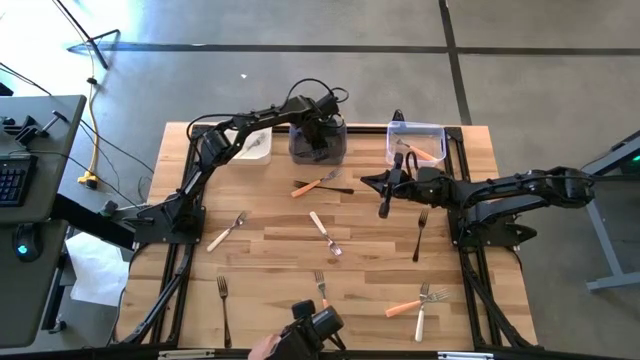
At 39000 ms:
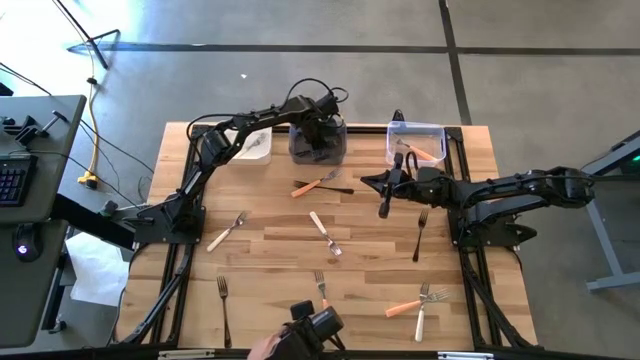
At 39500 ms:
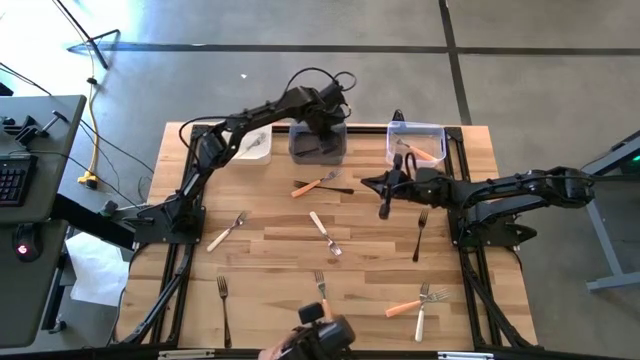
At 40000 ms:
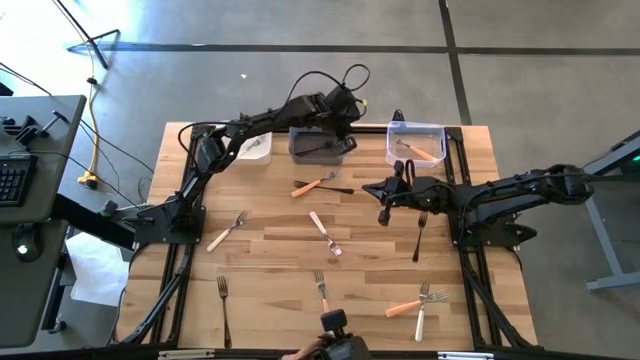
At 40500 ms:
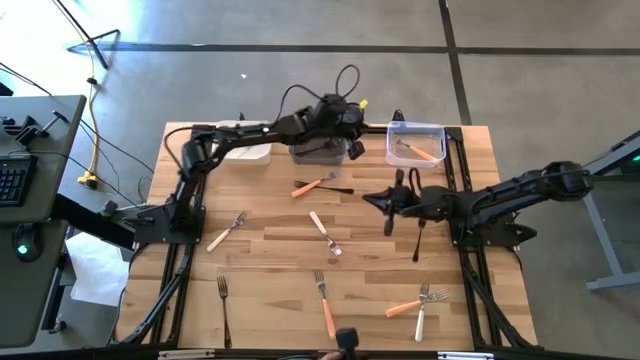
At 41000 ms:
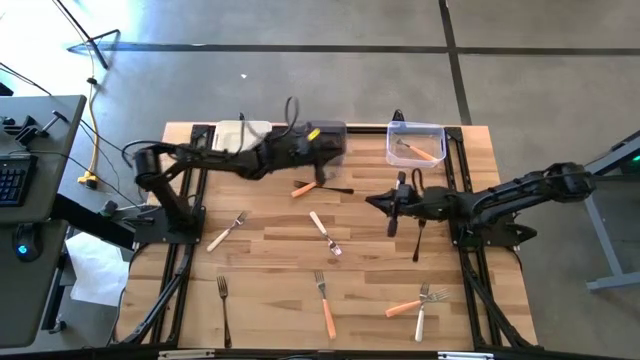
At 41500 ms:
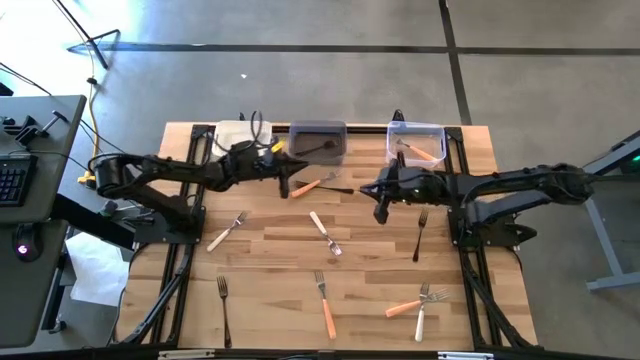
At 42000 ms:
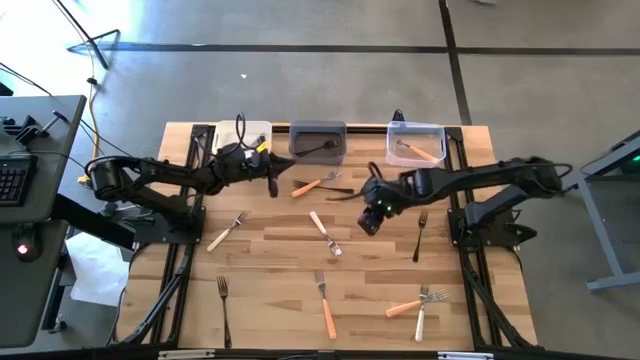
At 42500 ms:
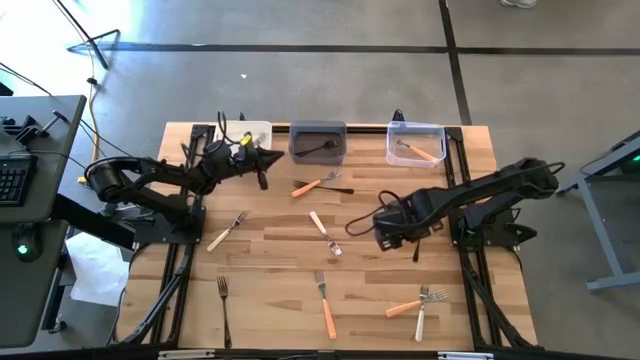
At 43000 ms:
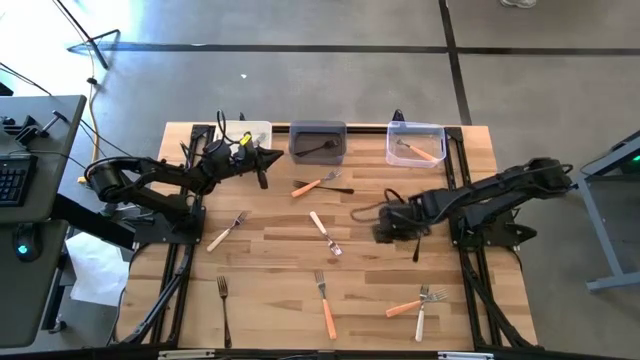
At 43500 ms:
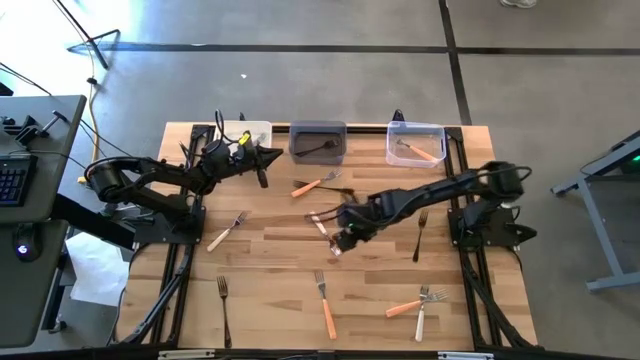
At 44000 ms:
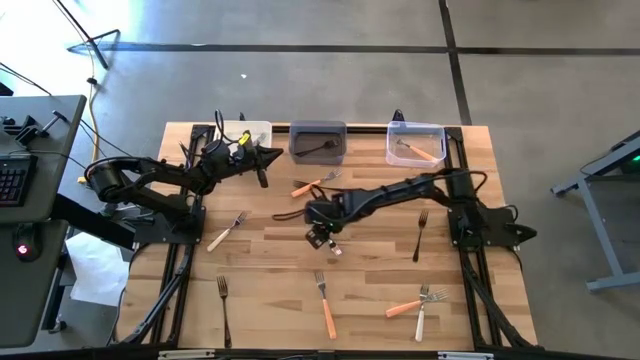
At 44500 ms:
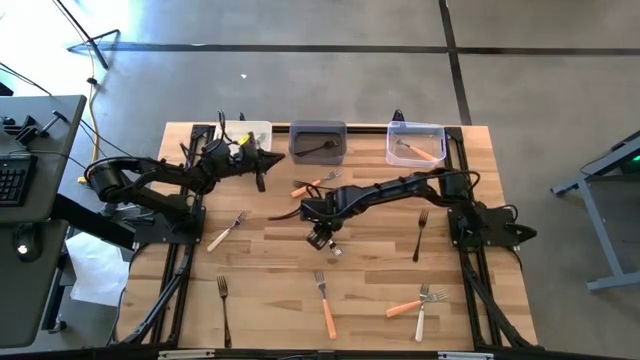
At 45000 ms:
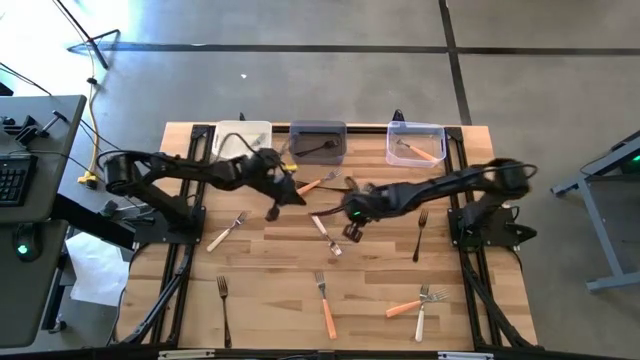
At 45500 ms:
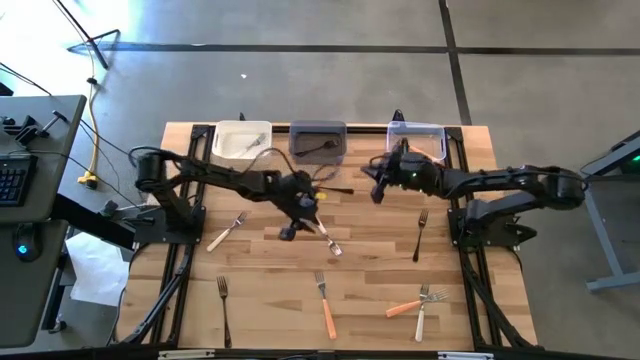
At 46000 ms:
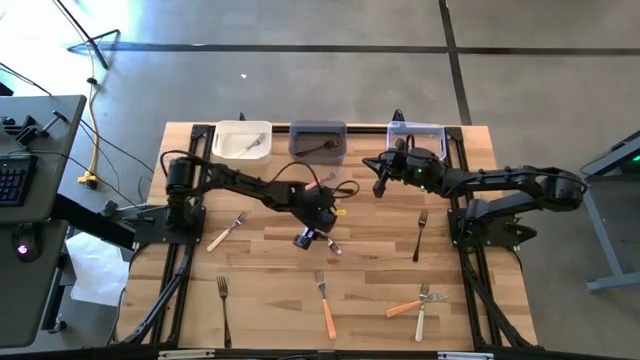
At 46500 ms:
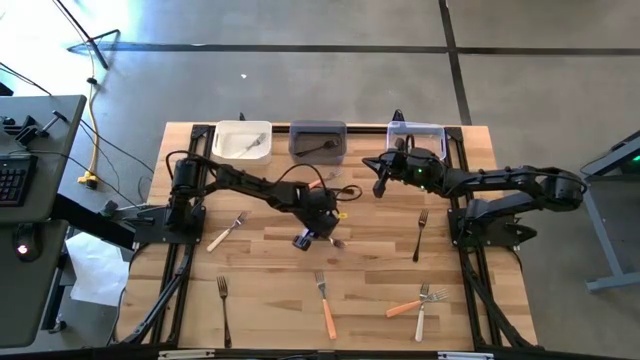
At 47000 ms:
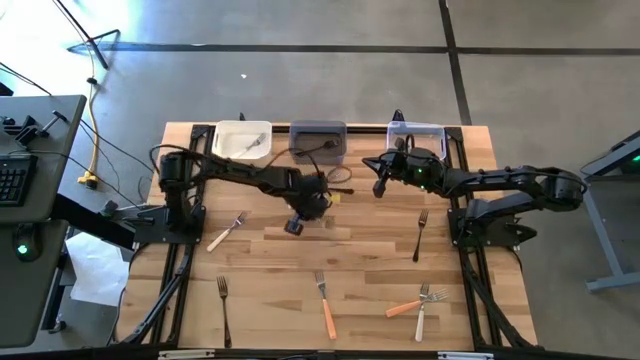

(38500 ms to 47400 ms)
Task: Sort silverware by color (type)
Put the white fork into the white bin

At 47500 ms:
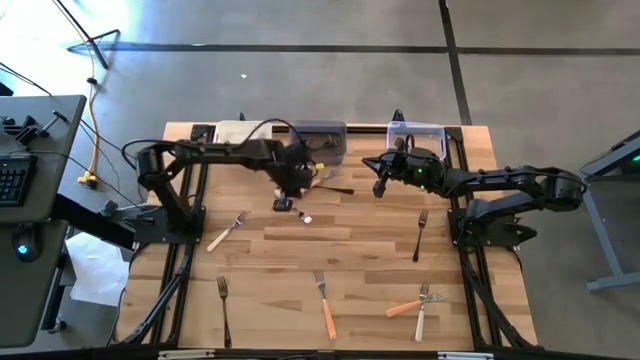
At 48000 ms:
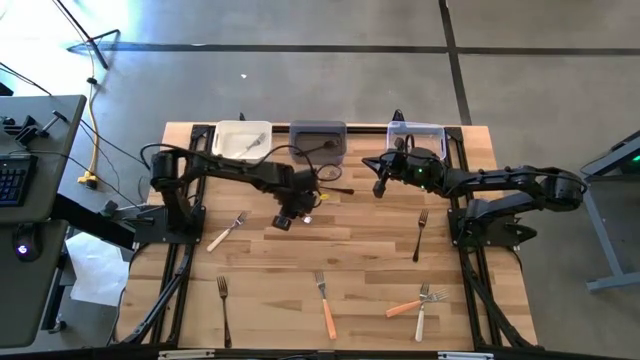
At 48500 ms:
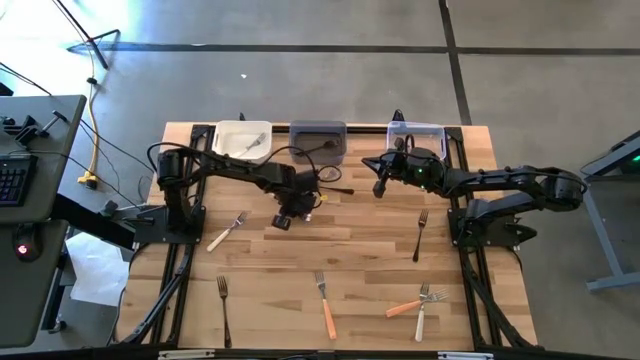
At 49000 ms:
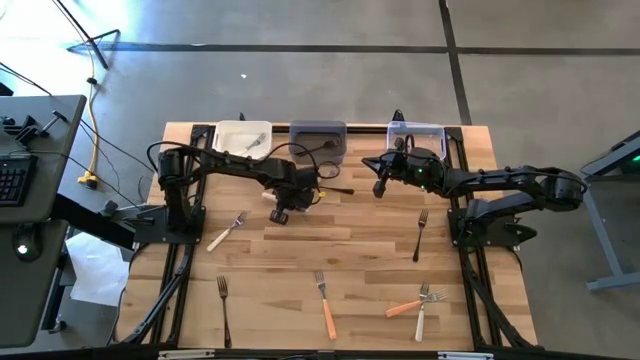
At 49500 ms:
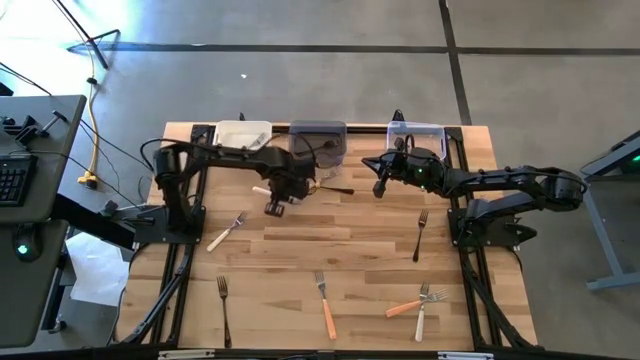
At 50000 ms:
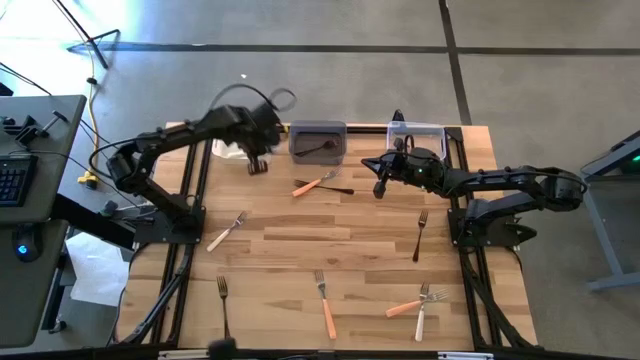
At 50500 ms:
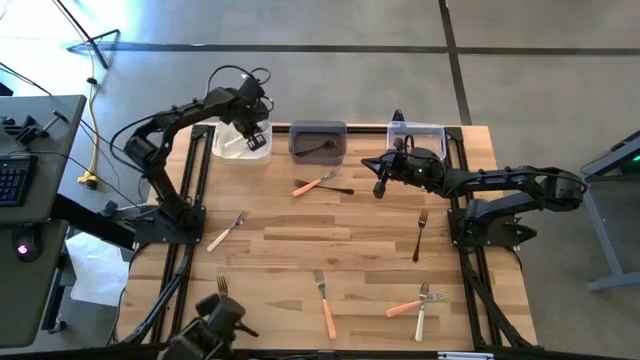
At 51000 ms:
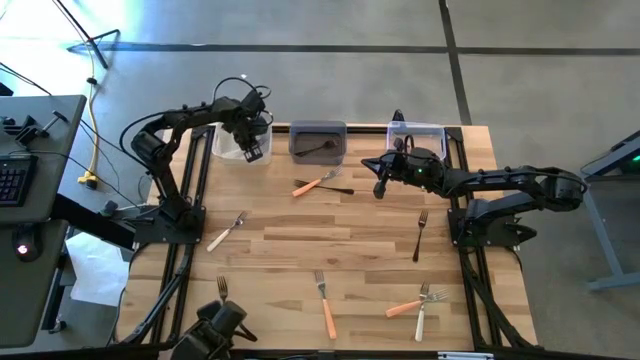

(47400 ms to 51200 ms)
Put the white fork into the white bin

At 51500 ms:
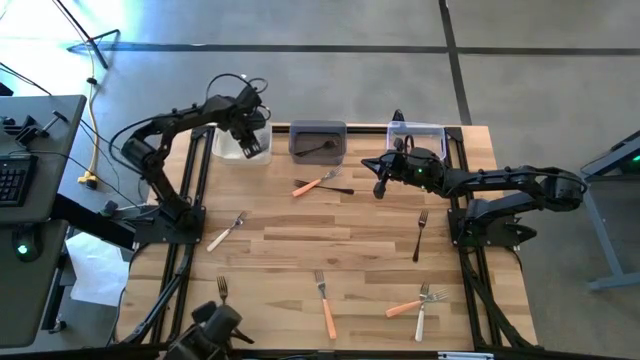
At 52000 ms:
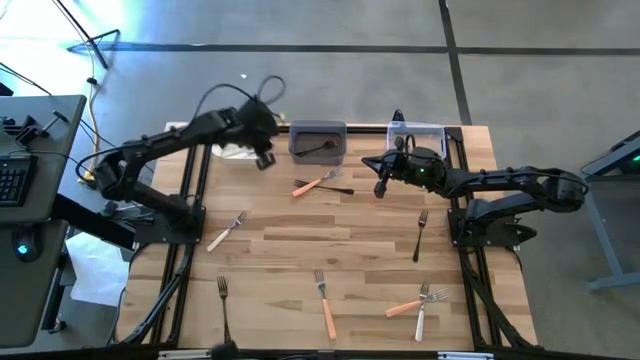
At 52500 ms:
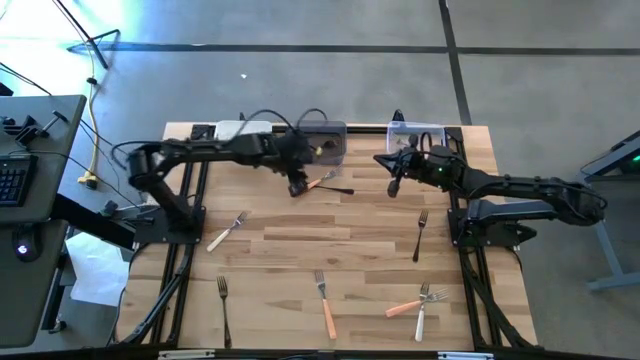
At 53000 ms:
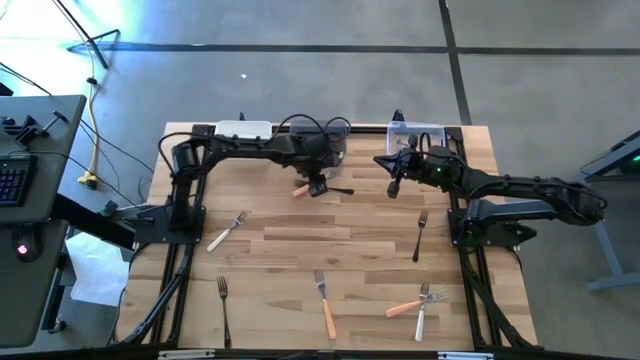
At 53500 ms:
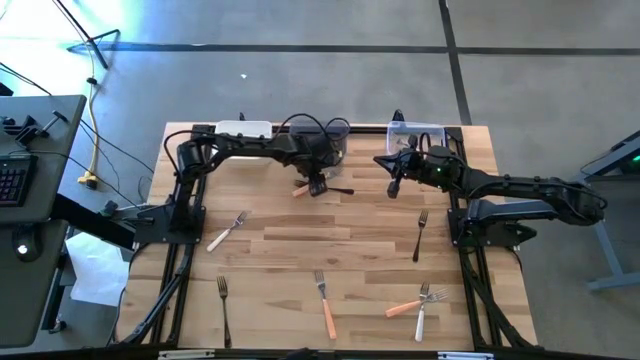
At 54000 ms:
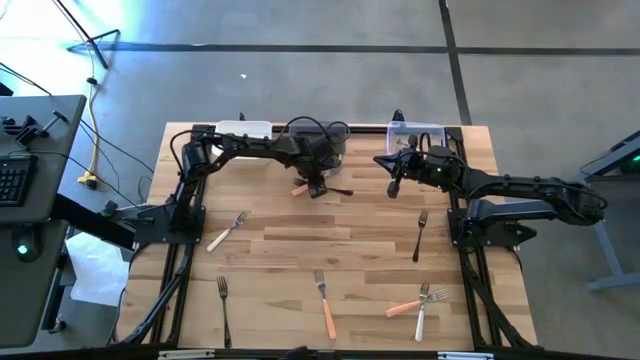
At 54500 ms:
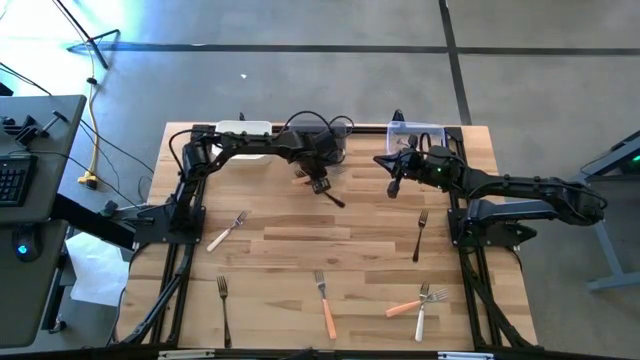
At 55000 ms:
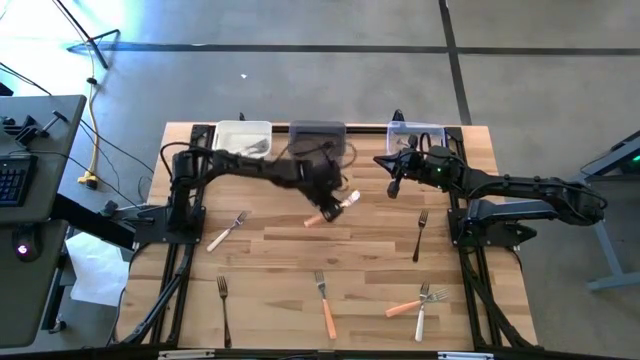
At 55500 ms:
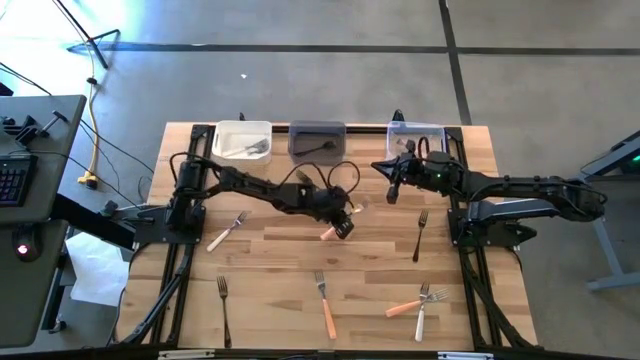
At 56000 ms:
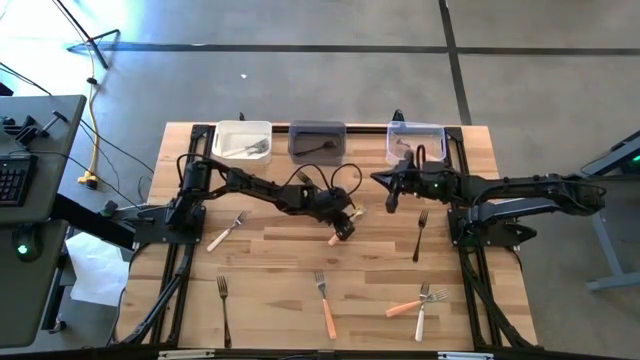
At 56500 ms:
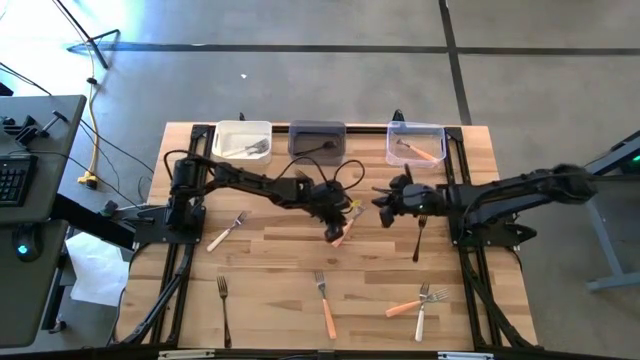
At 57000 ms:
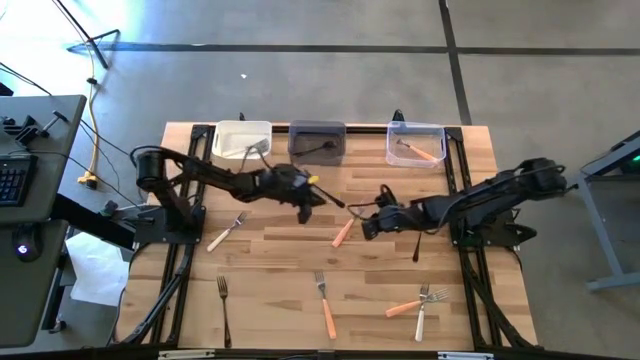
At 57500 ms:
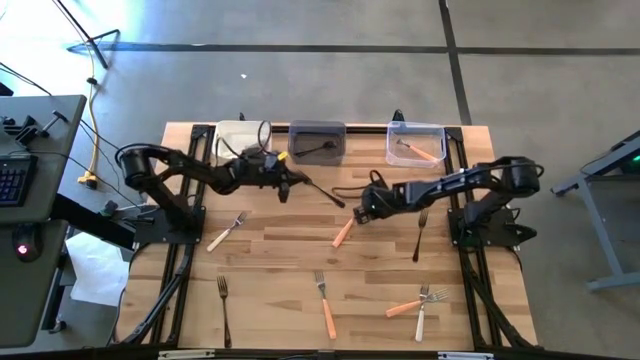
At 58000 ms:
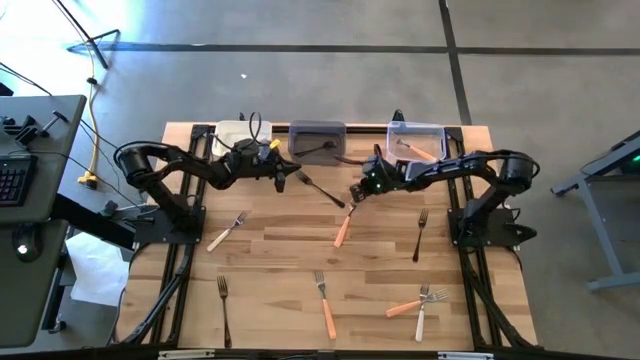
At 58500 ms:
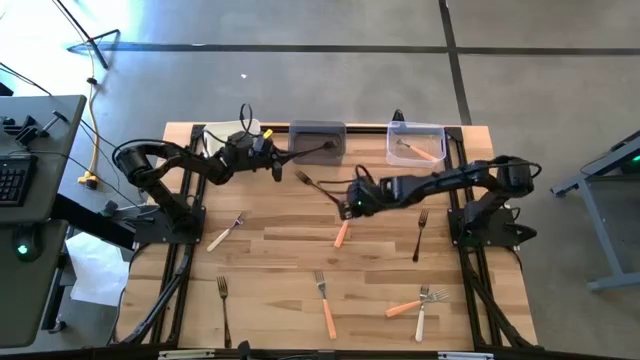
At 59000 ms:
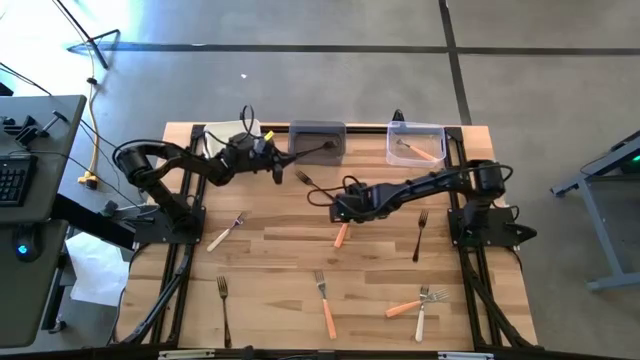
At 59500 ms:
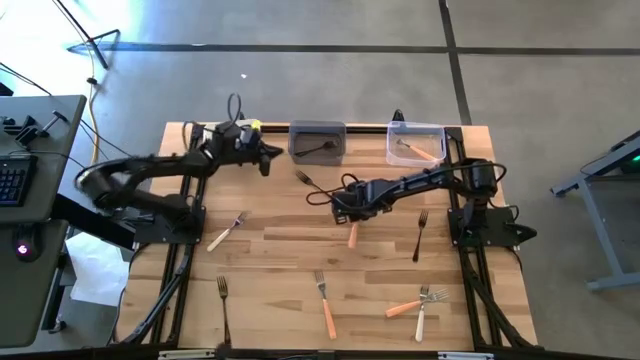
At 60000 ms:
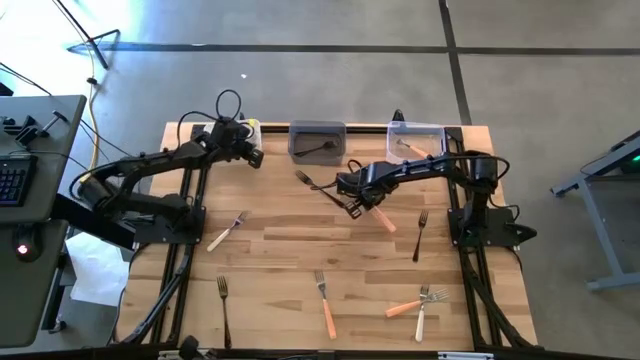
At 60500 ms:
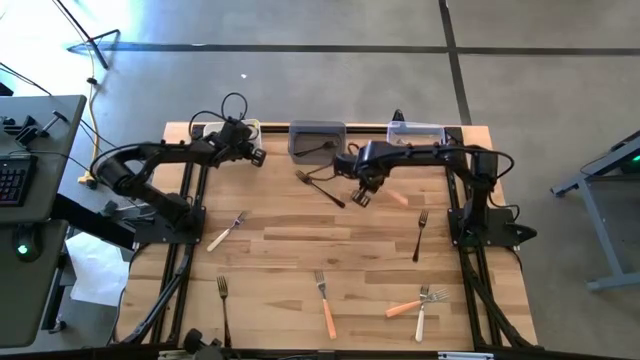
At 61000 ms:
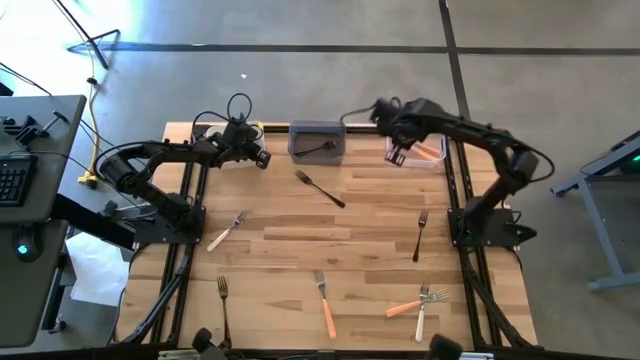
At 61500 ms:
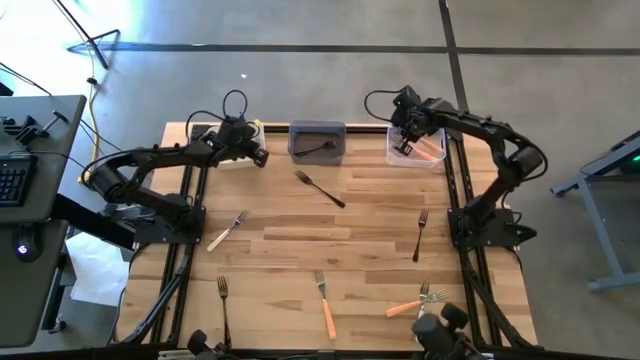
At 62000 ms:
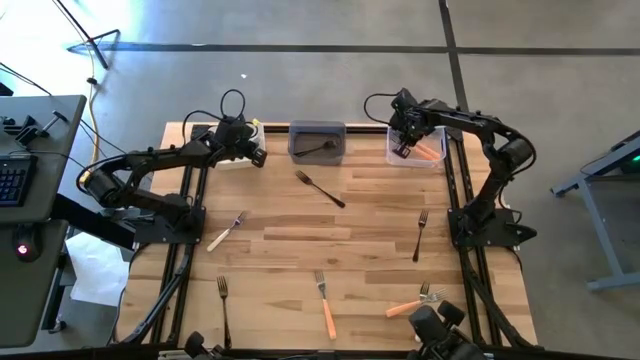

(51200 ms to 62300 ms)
Put the orange fork into the transparent bin
